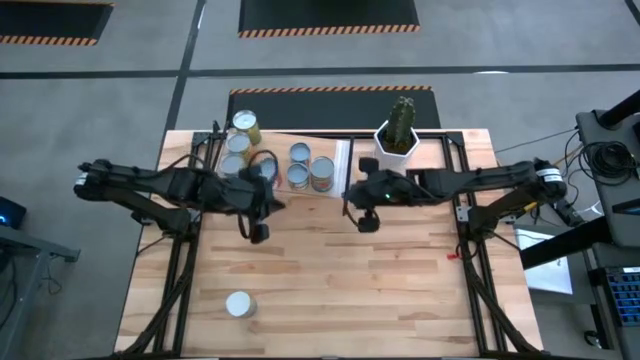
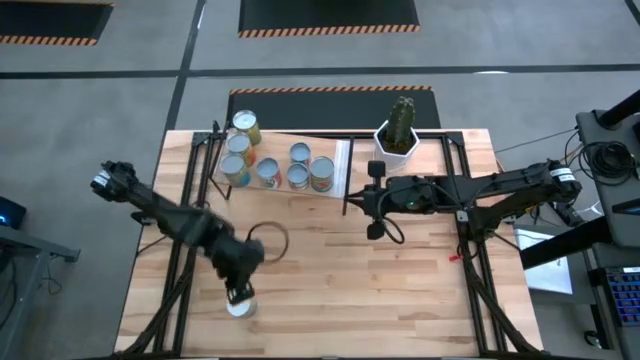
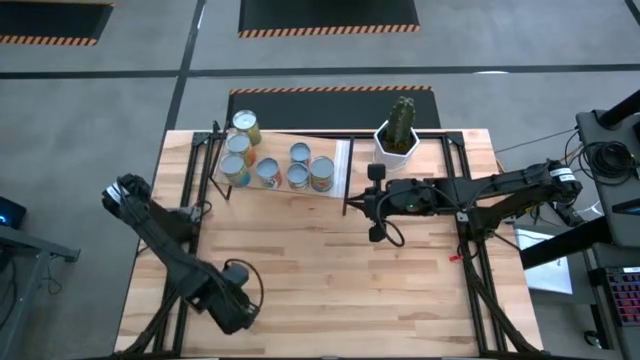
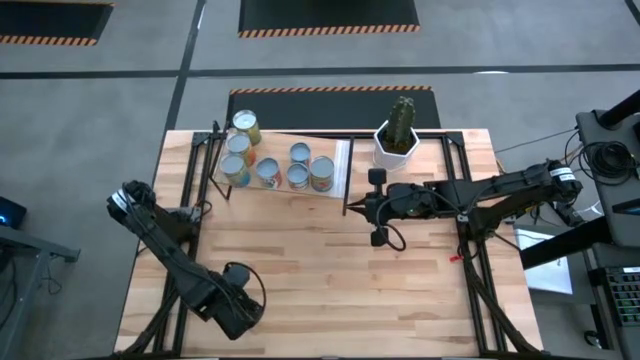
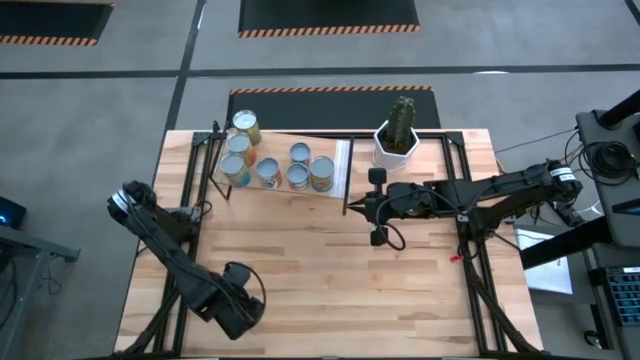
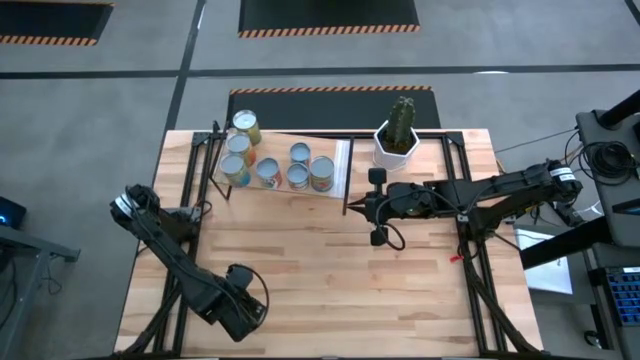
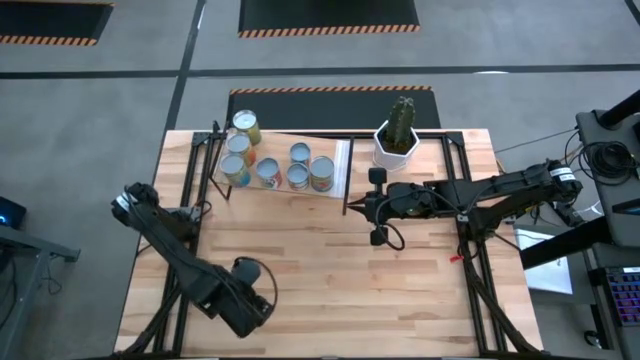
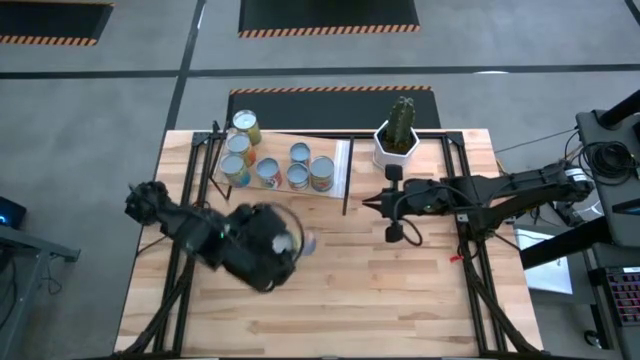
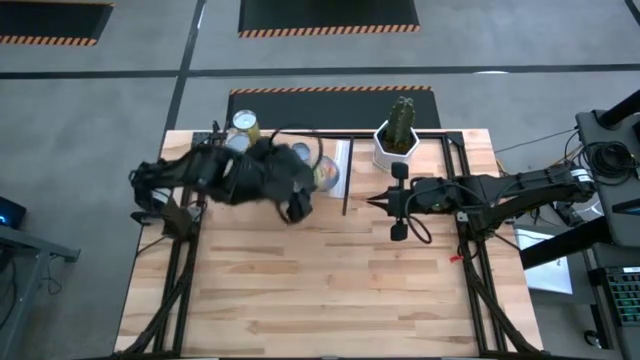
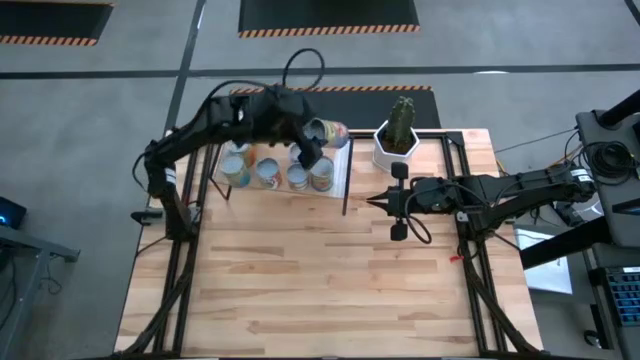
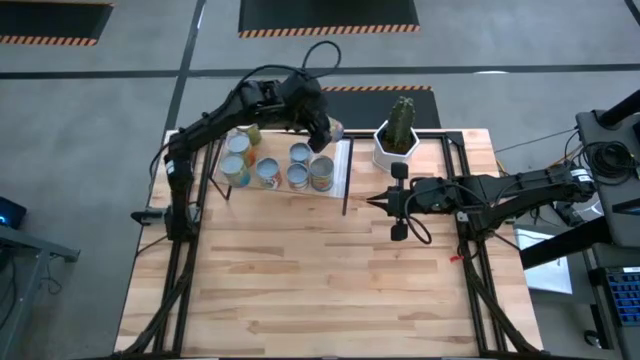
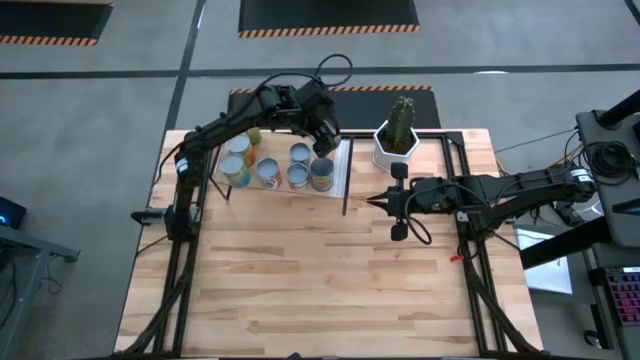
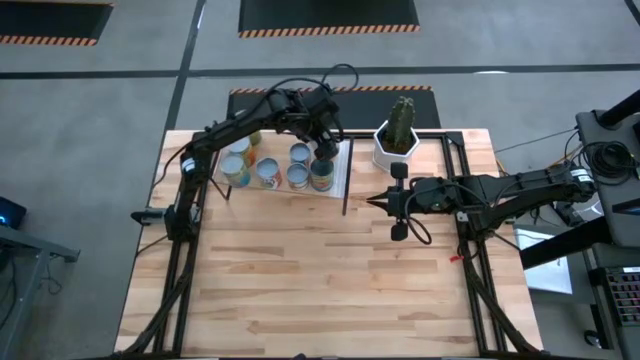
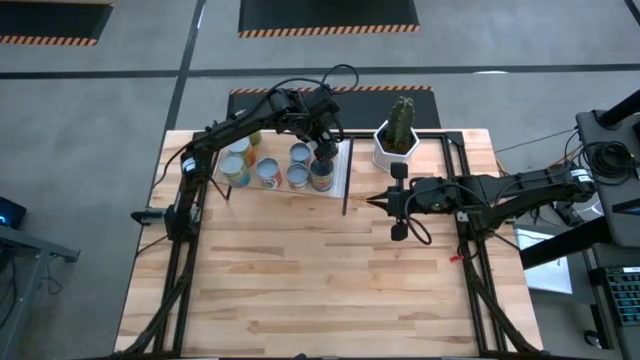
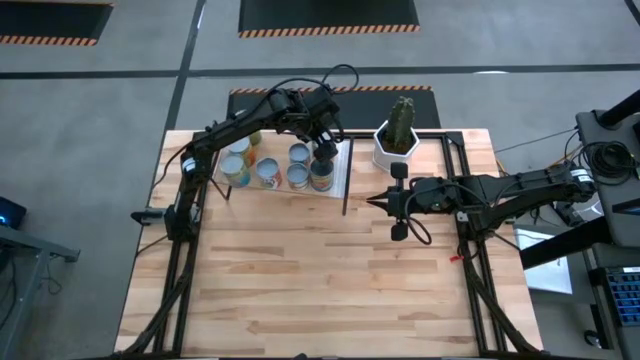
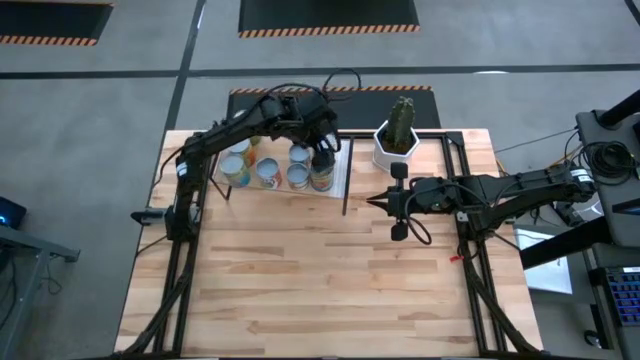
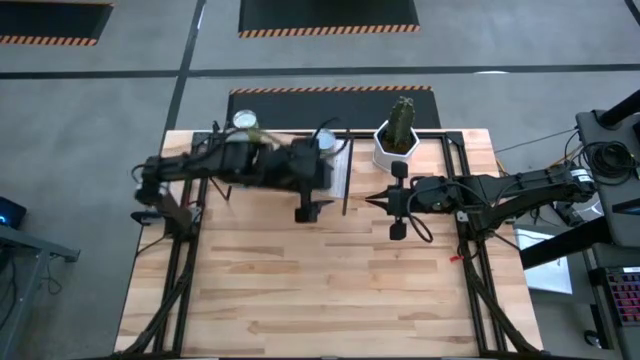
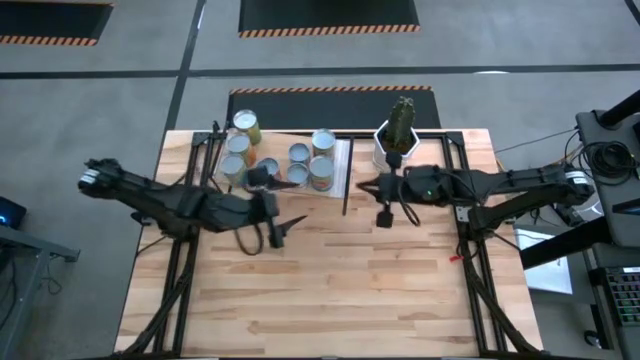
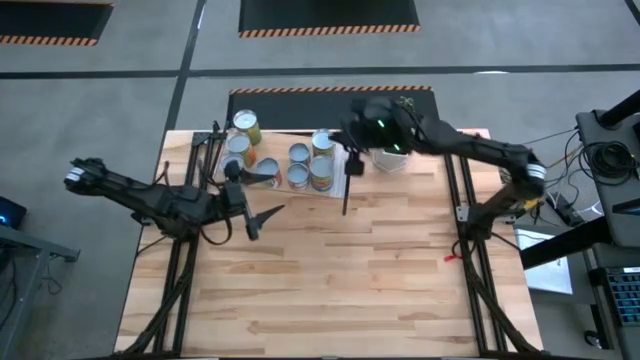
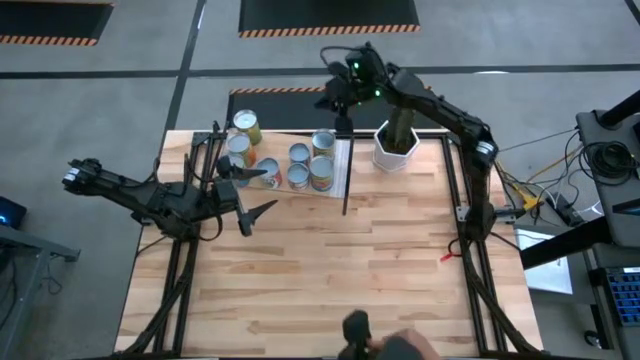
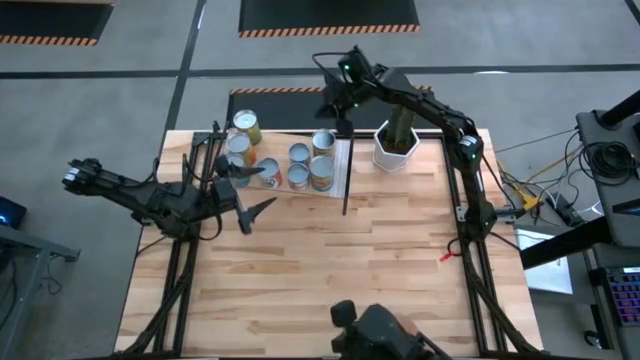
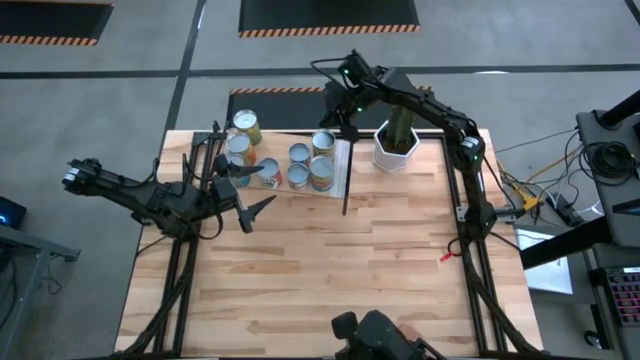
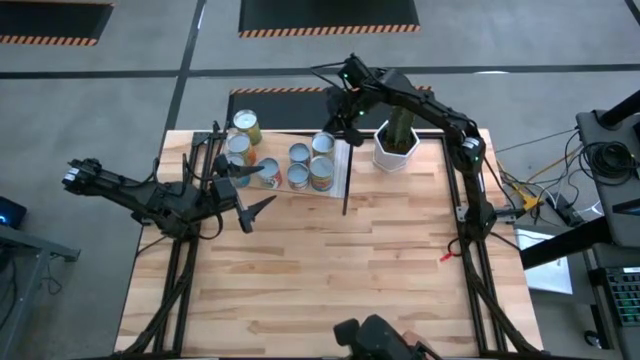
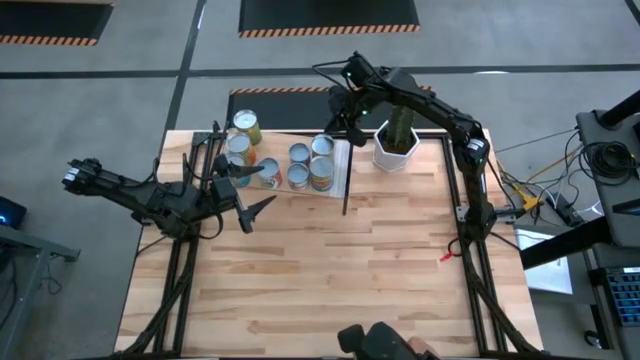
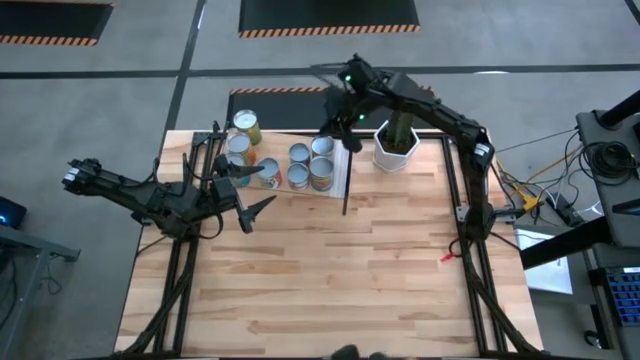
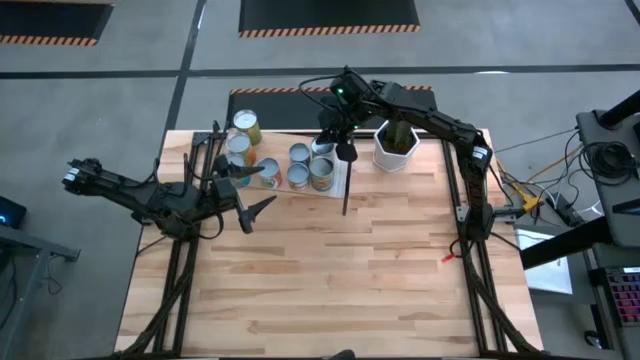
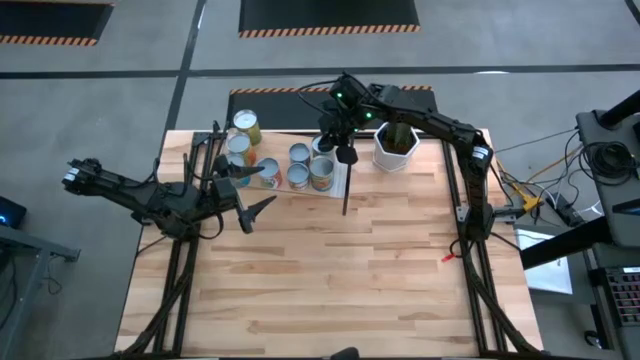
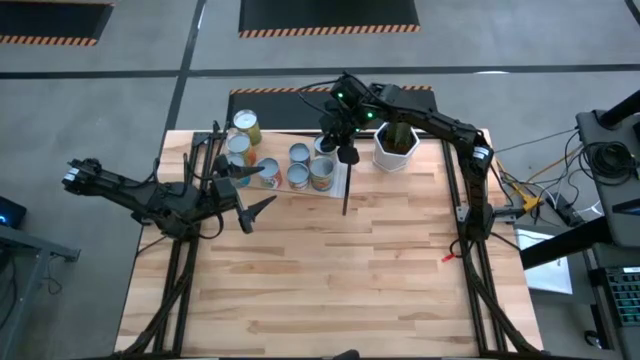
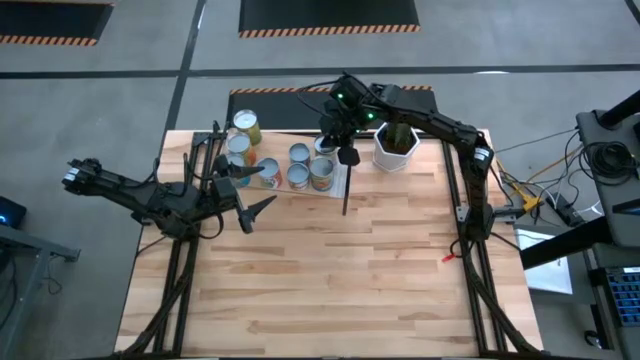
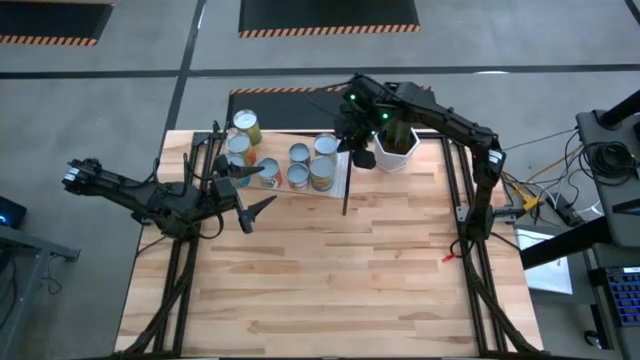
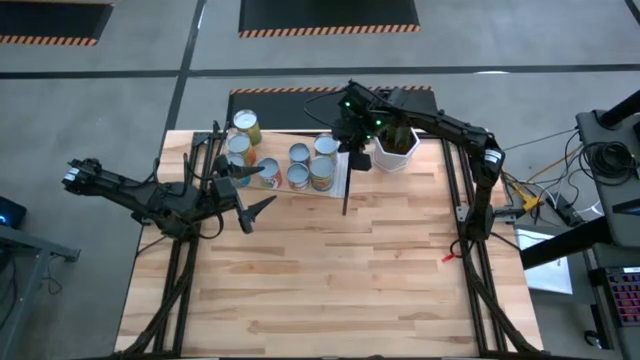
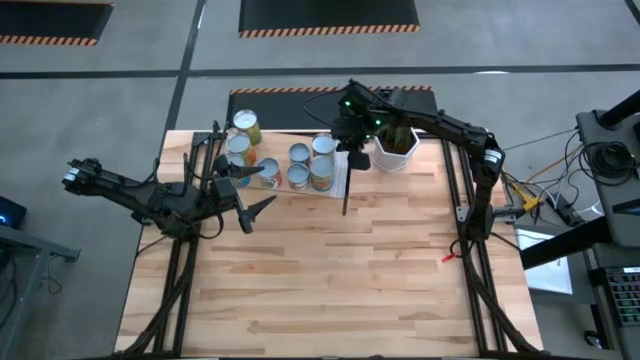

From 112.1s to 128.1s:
Task: Pick and place cans onto a shelf
Put canned peaches on the shelf

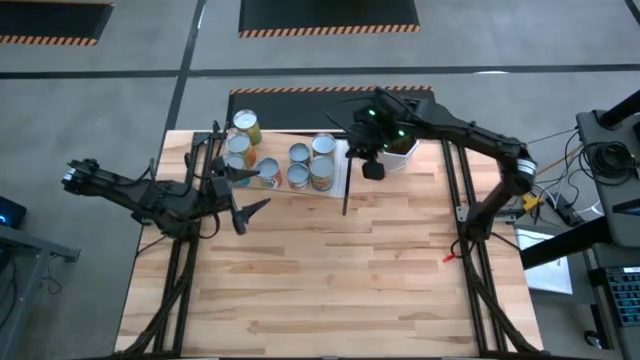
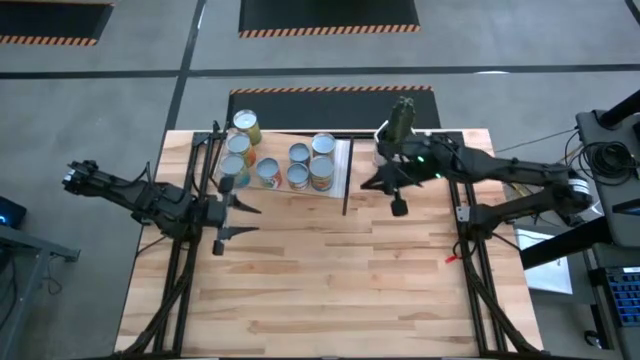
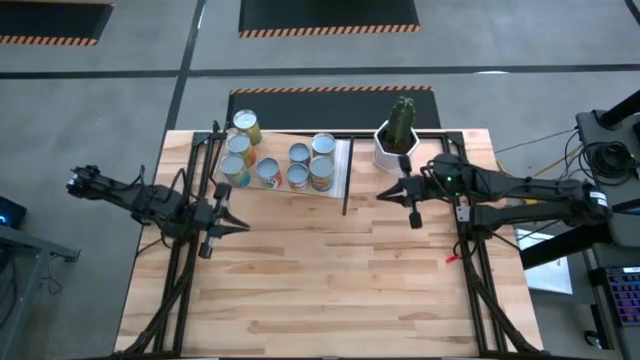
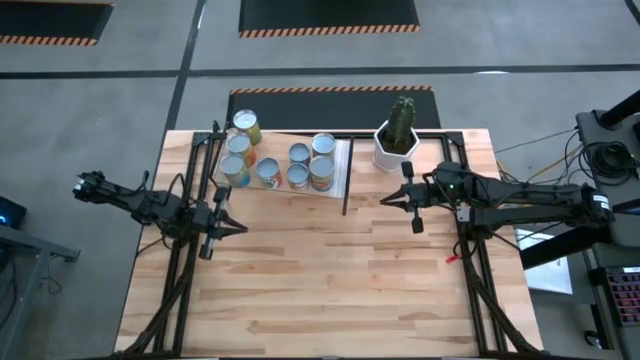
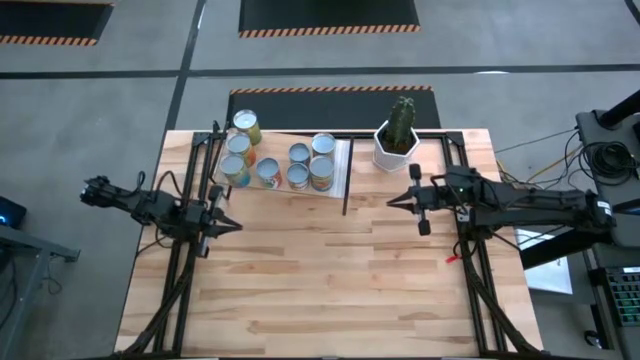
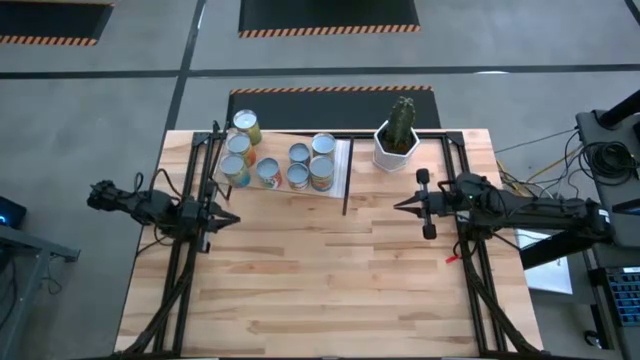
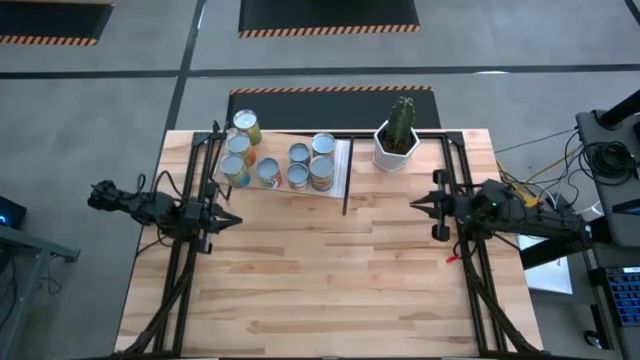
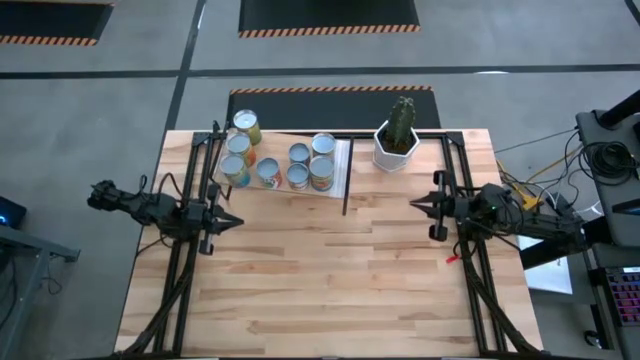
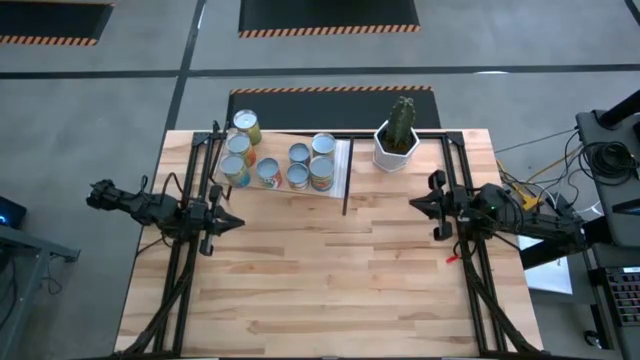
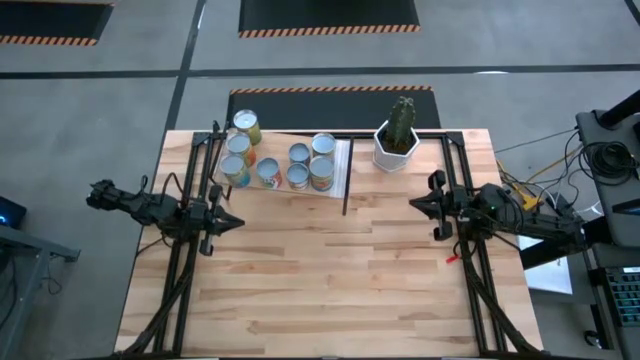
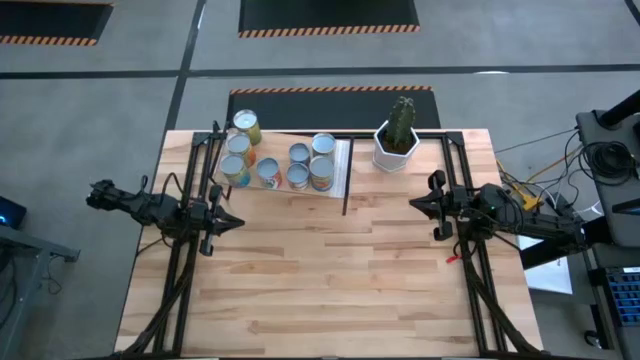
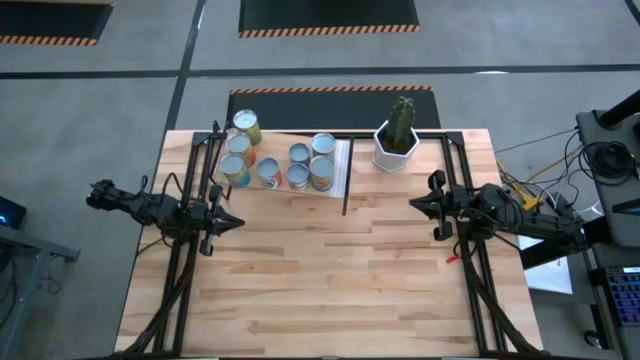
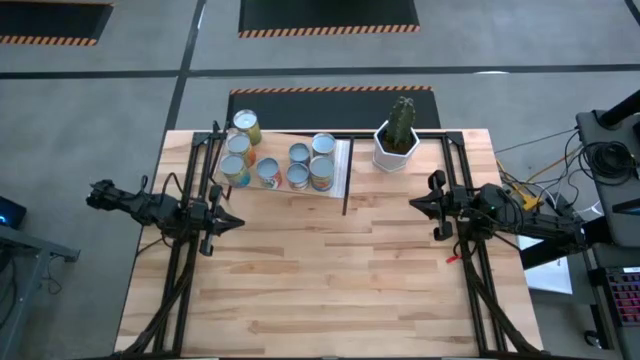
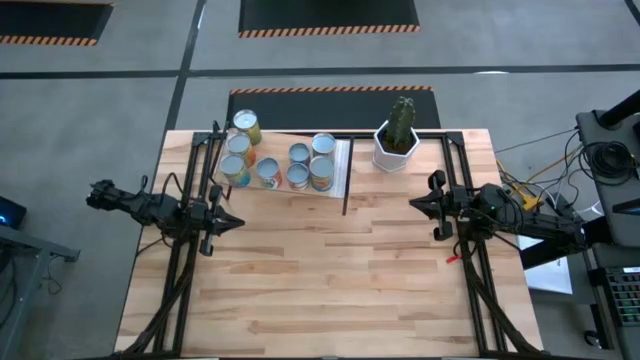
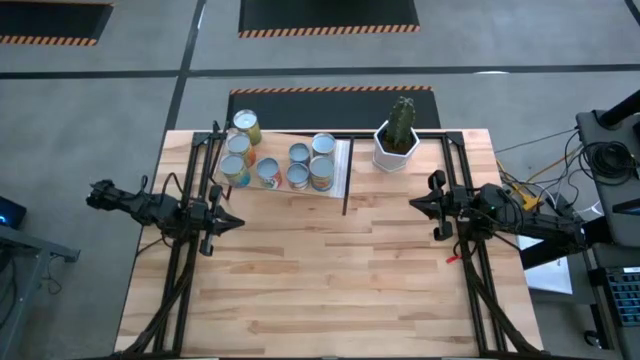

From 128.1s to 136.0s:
Return to Home Position
